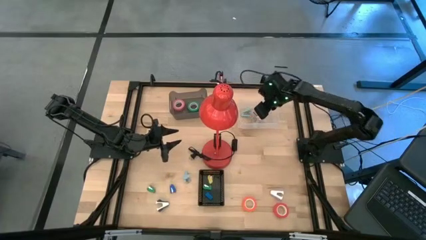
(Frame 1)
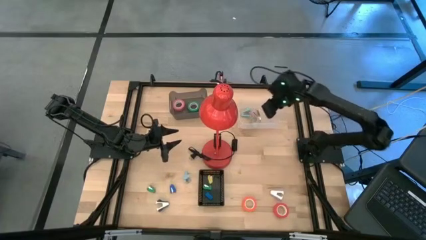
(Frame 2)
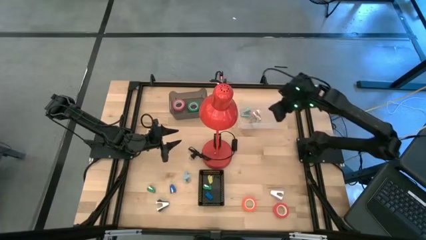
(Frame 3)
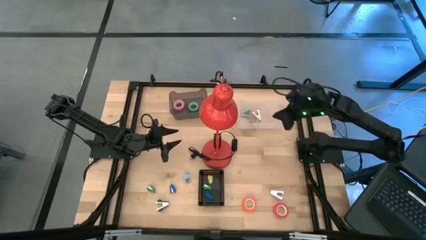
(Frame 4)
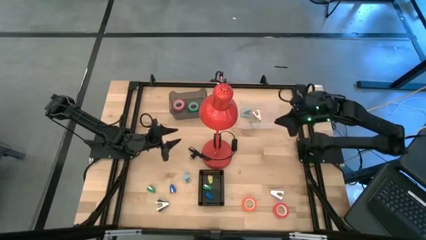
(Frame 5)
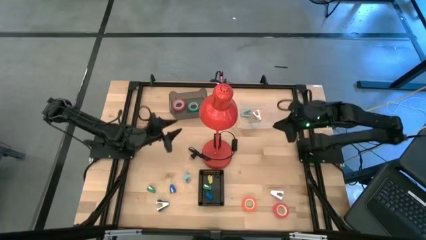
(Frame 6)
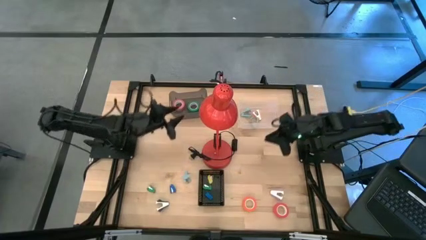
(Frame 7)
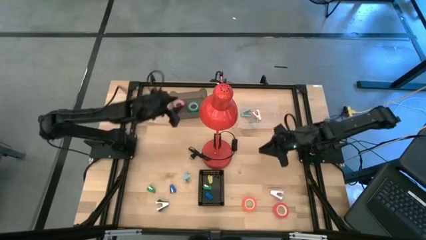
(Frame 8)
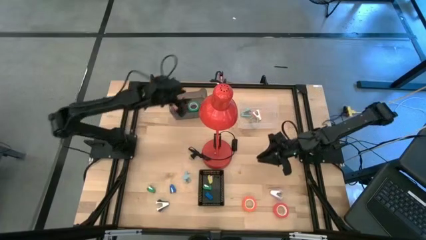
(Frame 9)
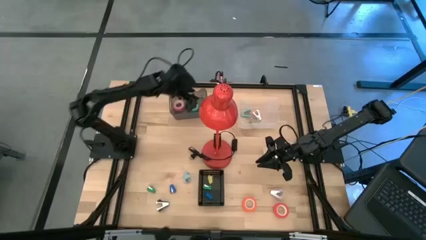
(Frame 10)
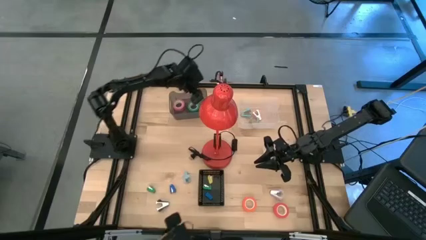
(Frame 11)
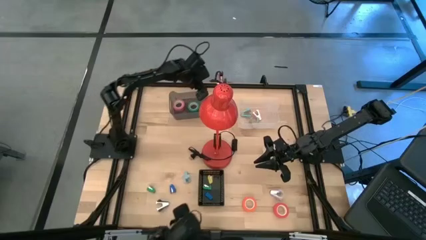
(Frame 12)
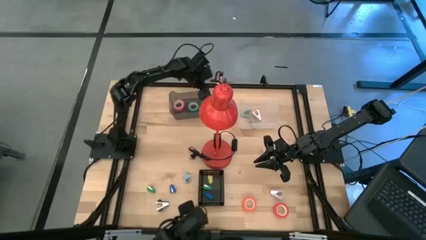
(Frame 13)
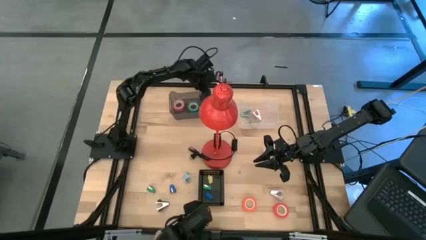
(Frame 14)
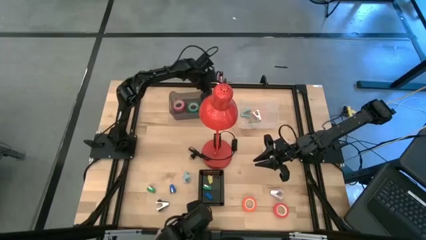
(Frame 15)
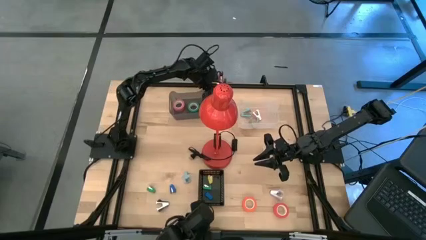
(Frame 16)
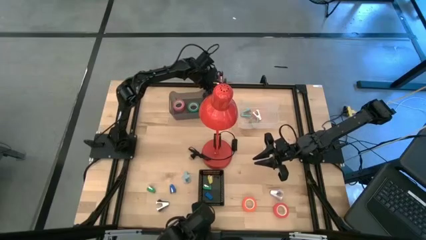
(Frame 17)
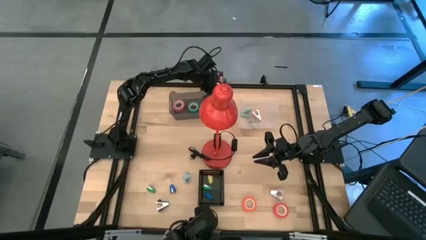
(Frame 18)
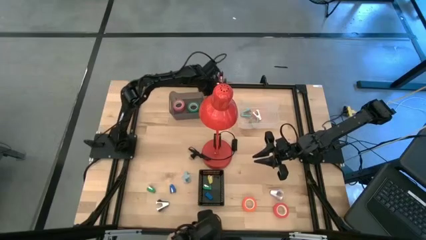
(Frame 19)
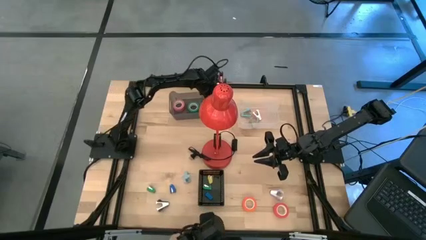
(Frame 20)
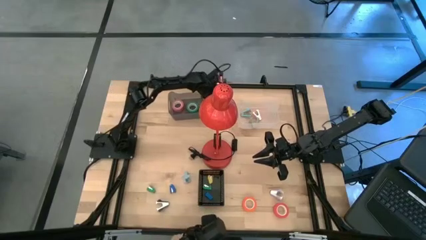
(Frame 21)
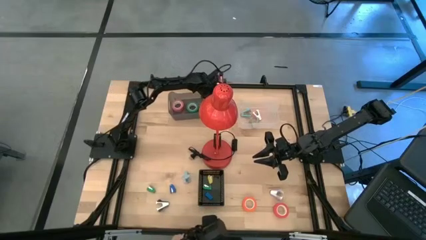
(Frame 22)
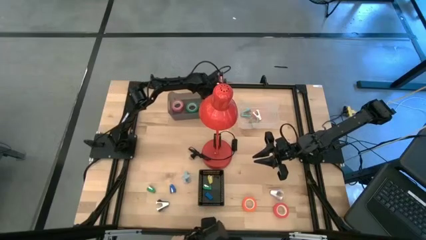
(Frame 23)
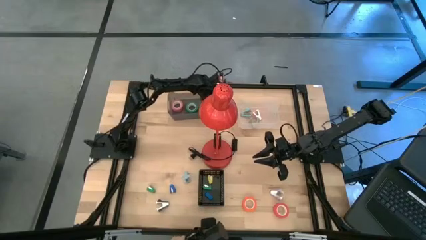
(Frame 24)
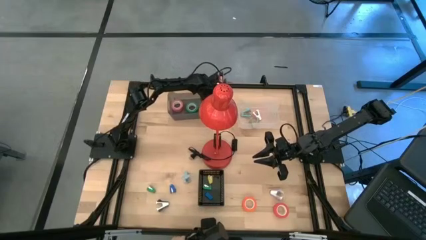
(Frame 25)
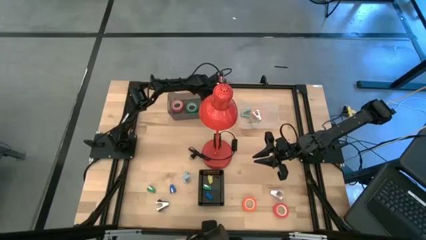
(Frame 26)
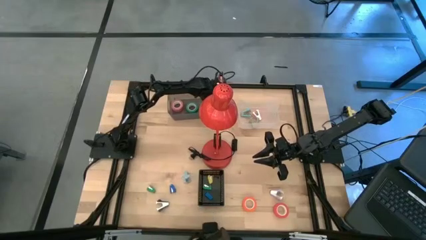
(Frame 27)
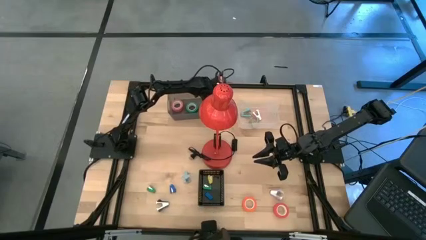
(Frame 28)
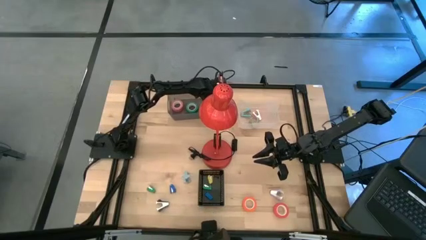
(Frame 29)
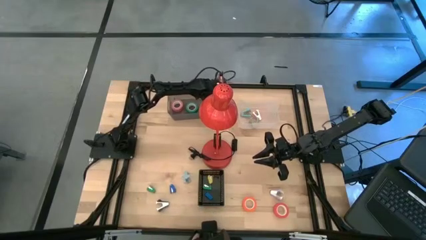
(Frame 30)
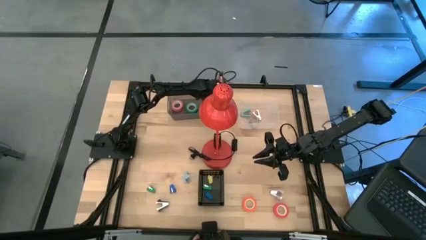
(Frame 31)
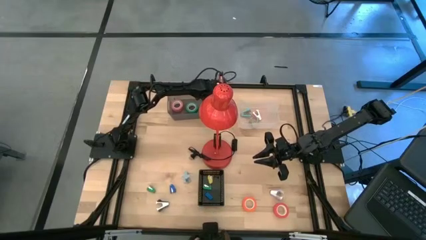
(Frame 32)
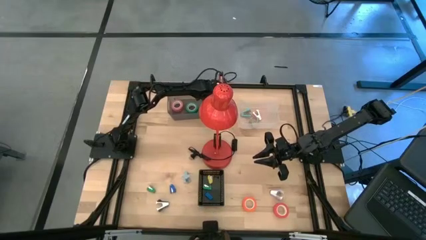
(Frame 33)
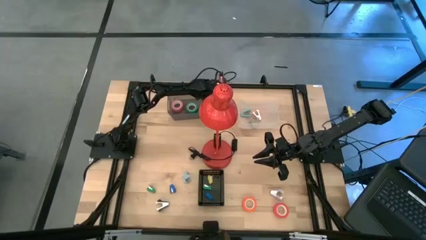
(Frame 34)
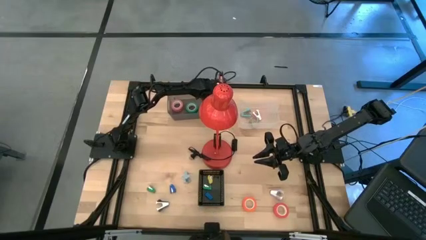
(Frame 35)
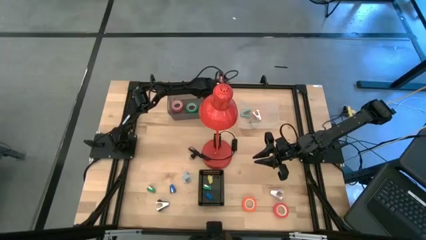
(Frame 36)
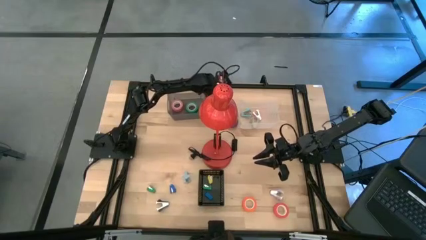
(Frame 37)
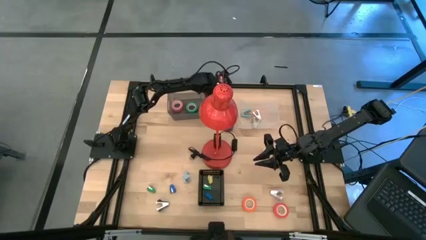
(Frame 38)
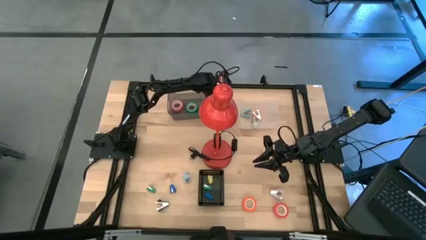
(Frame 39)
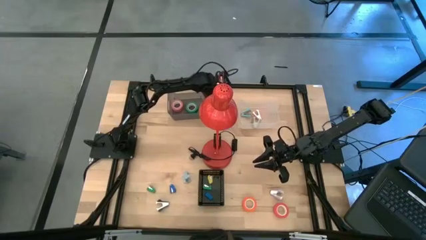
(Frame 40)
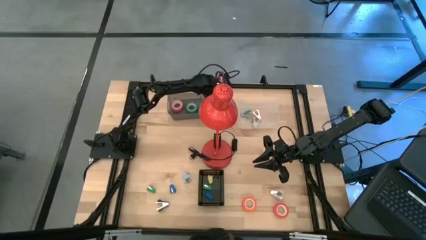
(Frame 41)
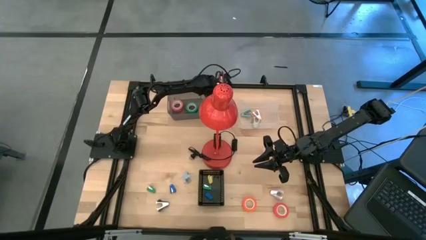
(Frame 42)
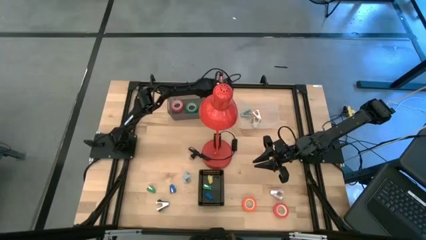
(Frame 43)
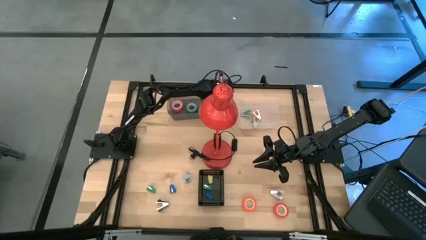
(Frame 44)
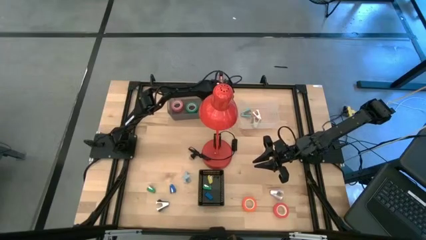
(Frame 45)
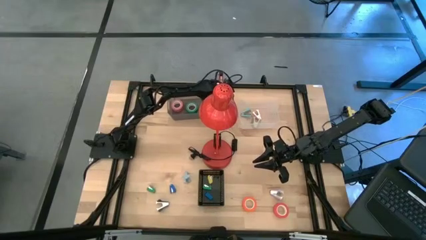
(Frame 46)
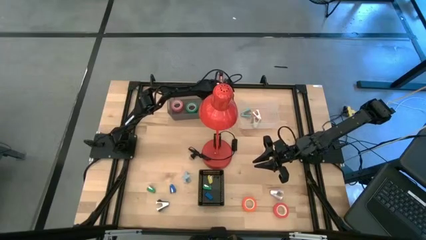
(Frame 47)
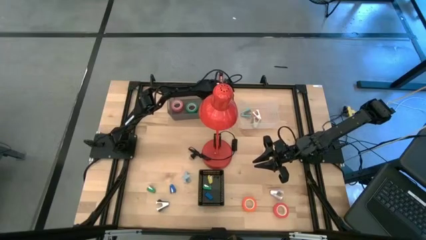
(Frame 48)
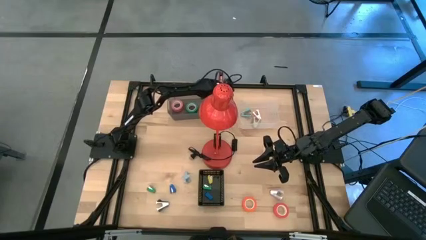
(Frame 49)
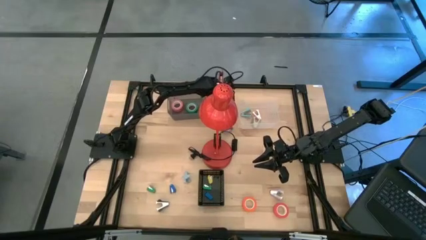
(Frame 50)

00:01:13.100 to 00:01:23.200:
Task: Pick and place Stapler, Stapler remover, tape
Put the dark blue tape into the black transparent bin

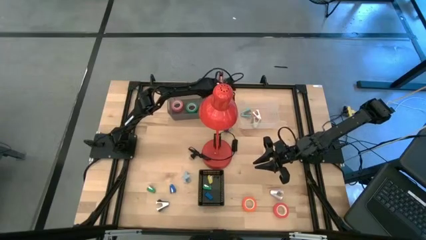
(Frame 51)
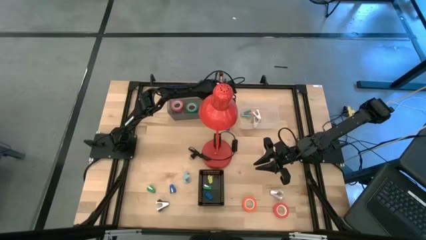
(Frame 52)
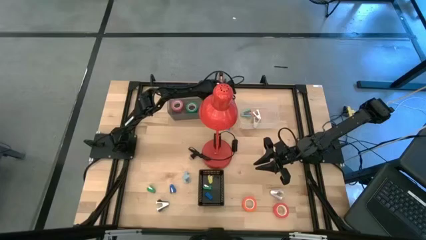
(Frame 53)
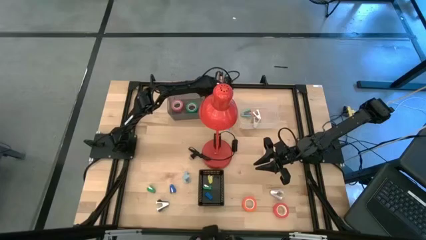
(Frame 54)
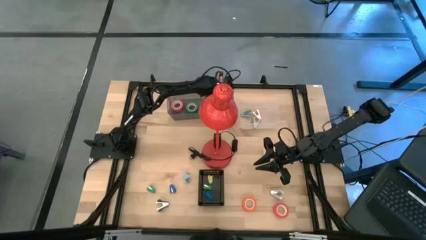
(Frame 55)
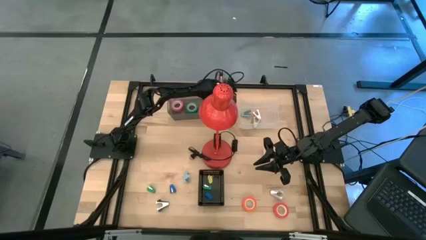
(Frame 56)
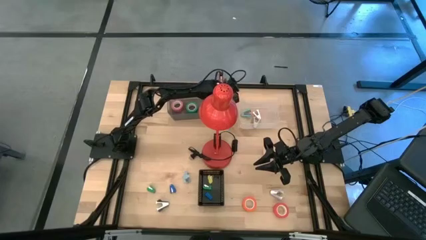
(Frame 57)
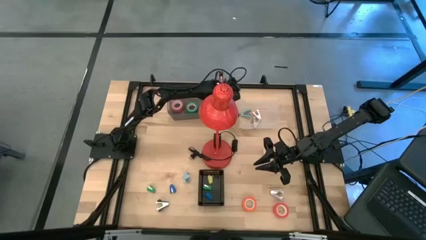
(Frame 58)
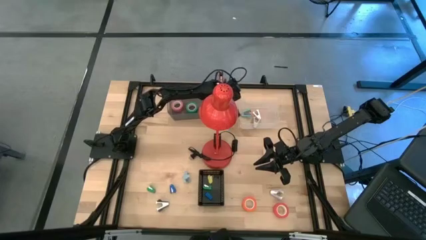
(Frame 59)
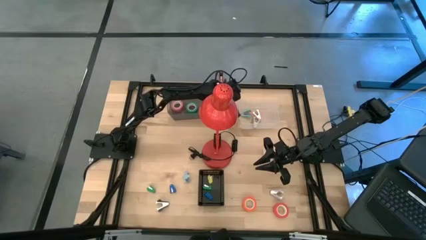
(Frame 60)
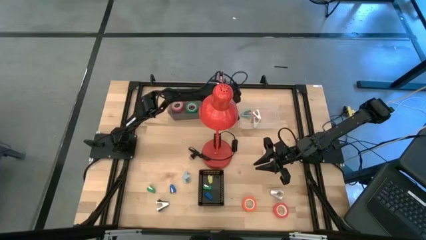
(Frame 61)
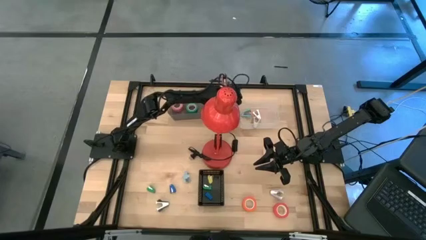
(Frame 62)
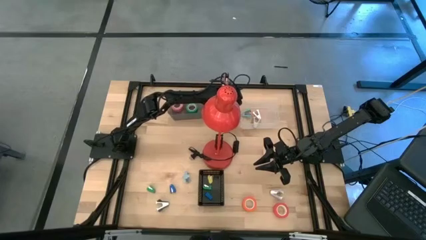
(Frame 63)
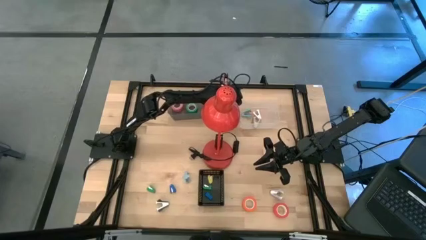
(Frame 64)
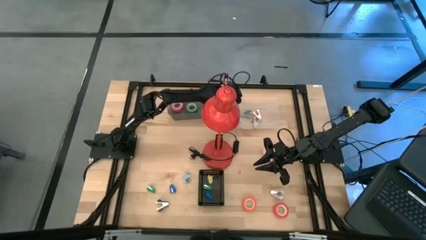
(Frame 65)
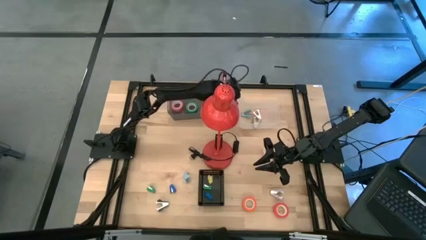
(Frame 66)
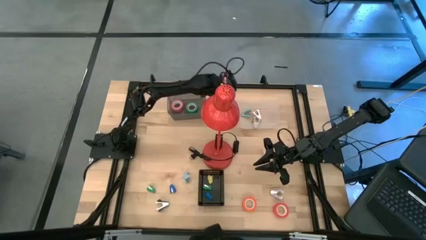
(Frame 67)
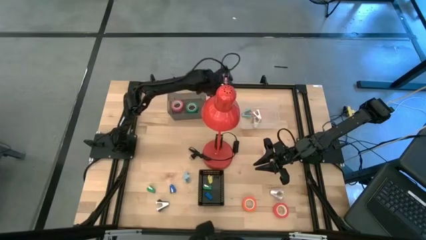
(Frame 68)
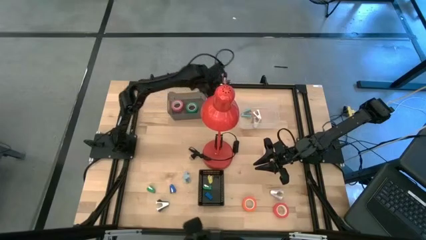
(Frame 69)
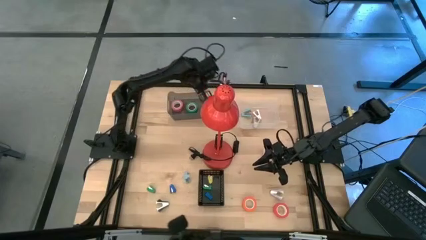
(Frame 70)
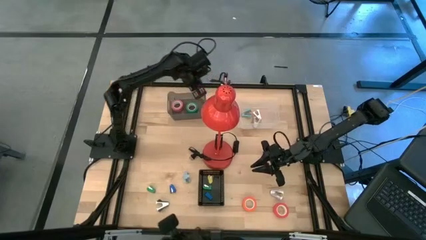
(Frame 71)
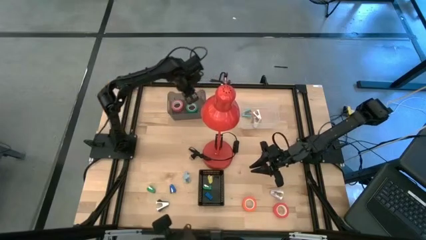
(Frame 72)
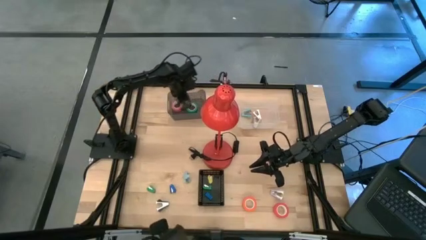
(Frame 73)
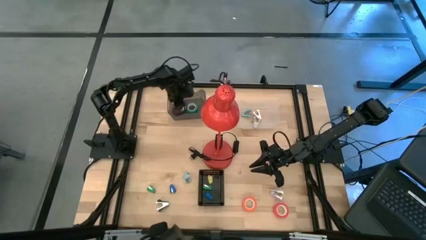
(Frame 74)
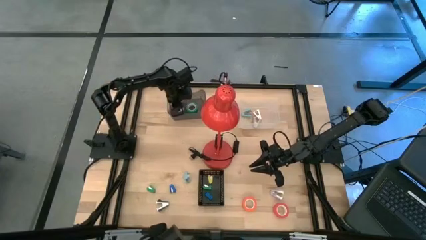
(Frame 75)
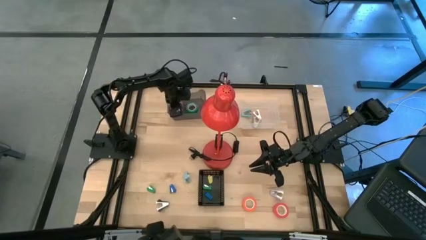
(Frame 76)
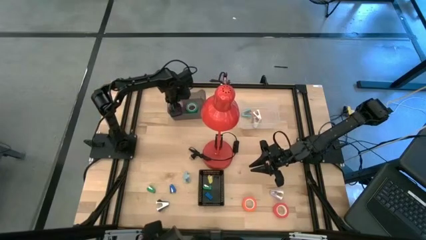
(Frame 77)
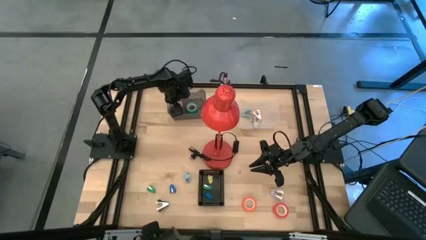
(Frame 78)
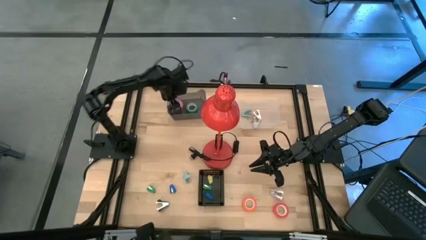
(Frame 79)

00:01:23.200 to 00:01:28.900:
Put the blue tape into the black transparent bin
